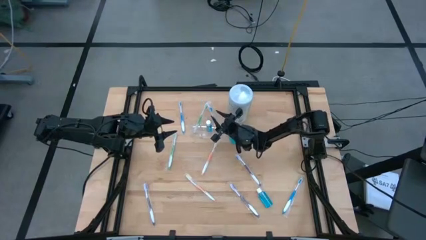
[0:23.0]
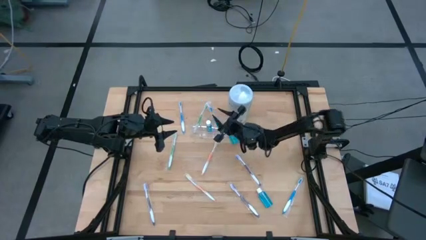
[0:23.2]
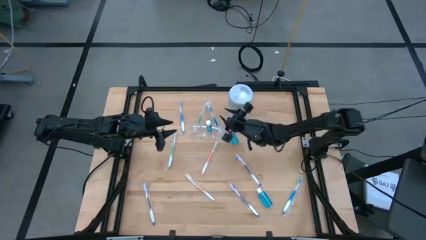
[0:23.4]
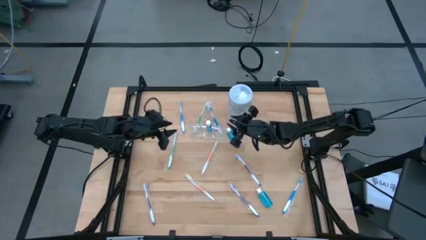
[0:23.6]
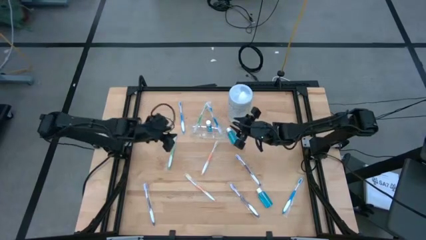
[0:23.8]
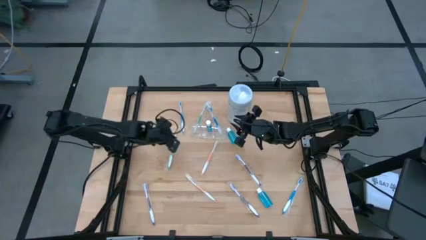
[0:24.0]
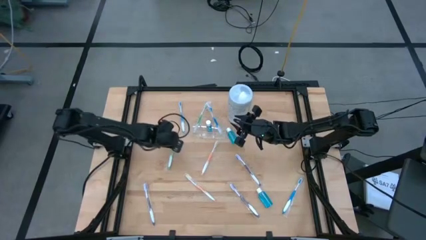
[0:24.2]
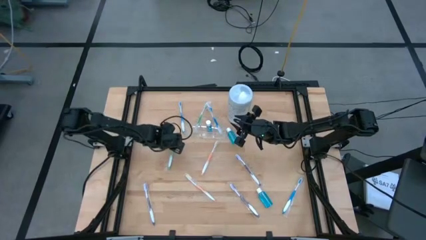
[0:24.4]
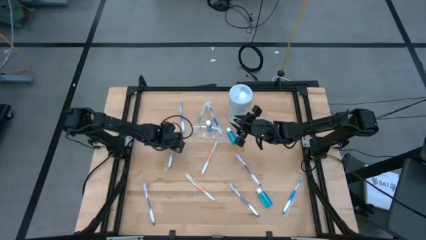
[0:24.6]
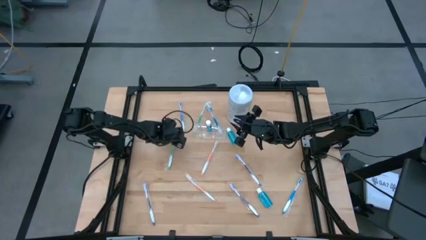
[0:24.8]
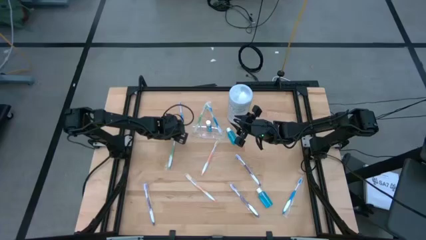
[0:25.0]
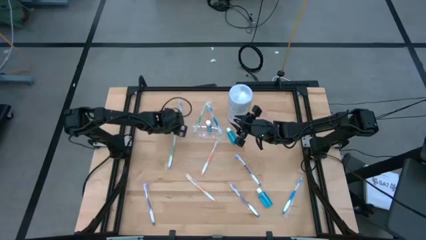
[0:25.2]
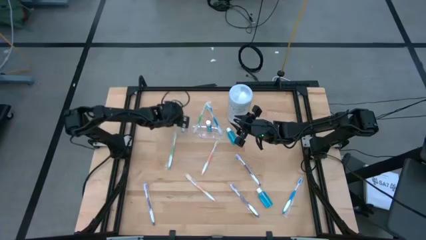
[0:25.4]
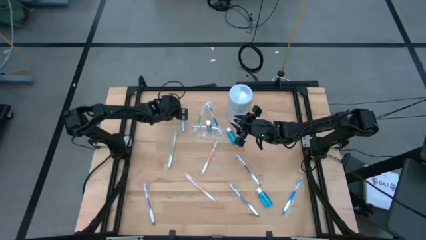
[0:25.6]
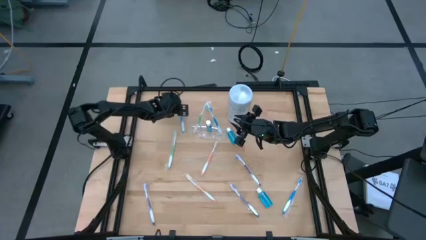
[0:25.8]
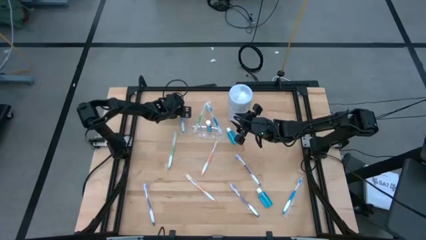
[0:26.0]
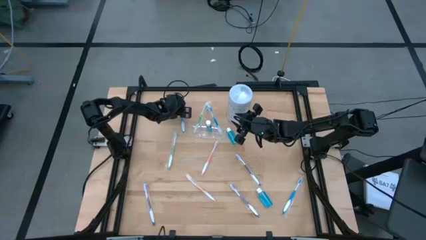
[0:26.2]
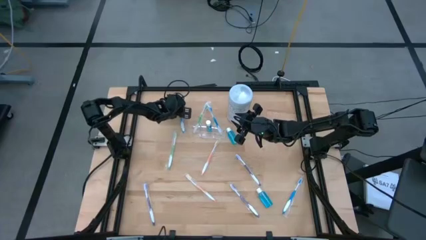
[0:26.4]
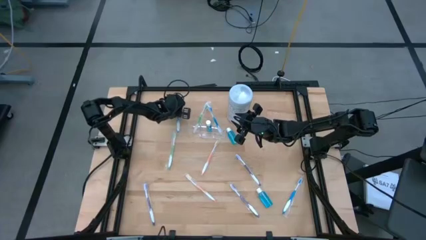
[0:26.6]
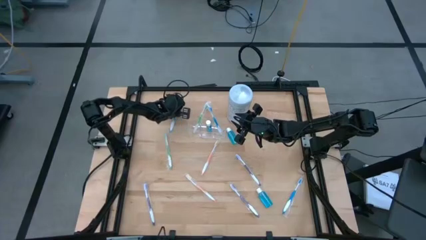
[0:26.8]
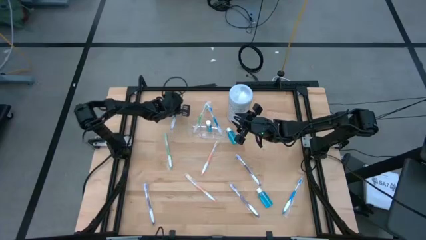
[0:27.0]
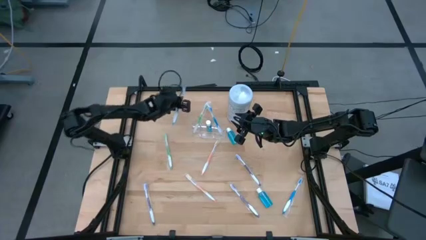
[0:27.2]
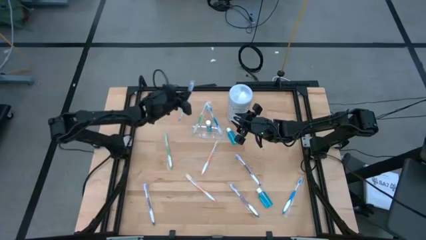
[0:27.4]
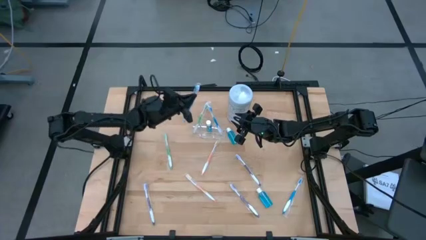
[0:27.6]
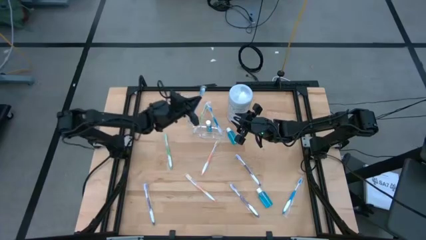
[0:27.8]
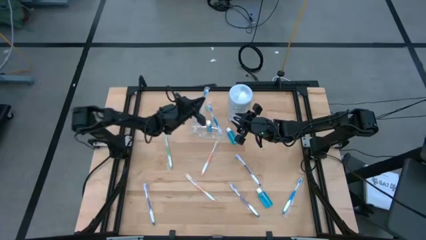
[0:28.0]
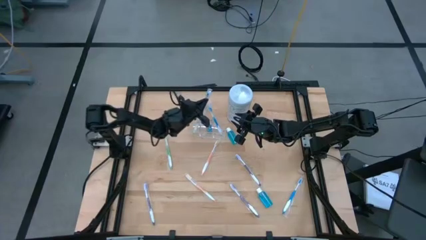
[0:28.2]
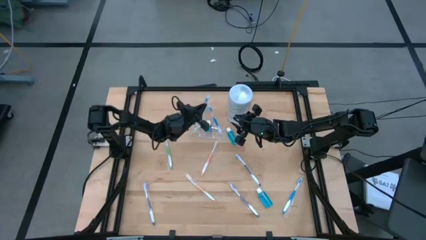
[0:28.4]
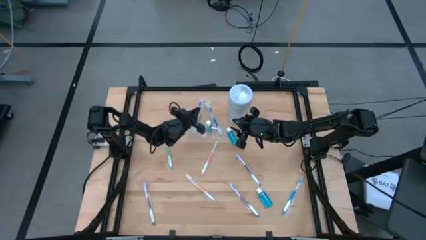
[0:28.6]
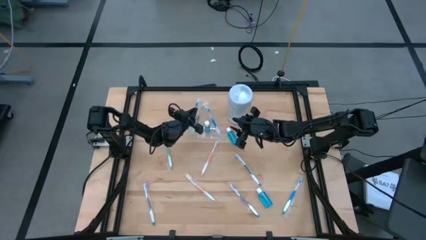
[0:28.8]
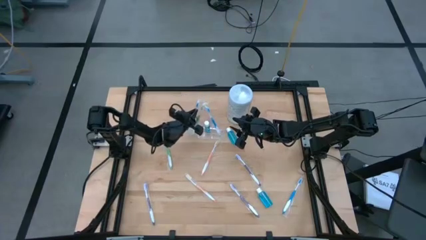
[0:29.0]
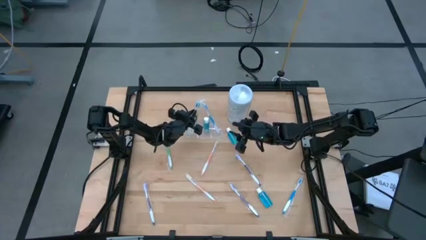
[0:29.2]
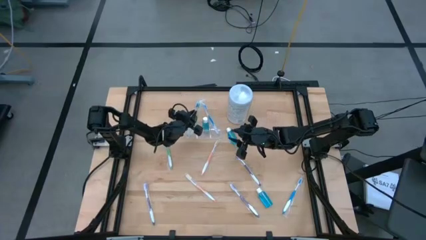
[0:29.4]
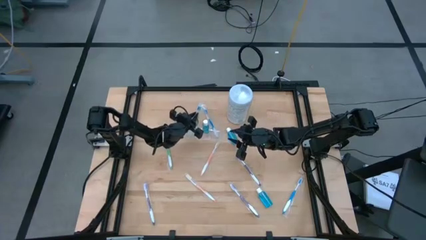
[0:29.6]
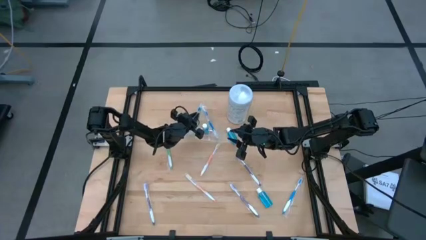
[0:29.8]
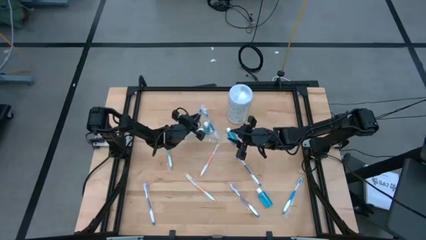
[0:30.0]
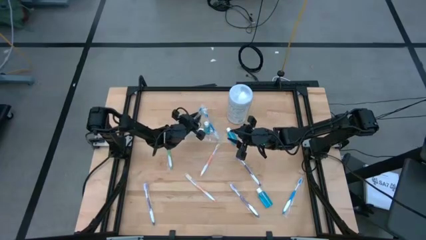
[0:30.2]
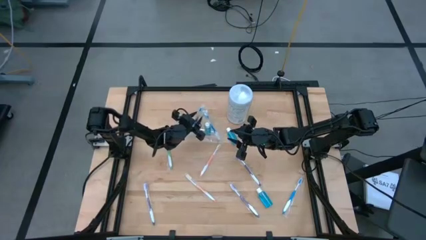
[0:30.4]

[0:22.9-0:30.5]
Task: Pick & Place toothbrushing station
Put the top blue toothbrush into the transparent organizer

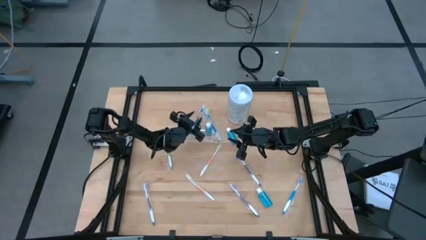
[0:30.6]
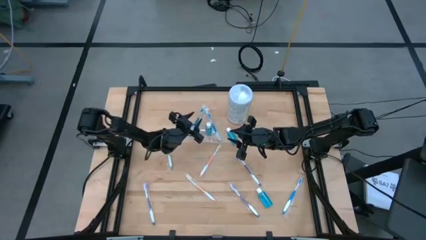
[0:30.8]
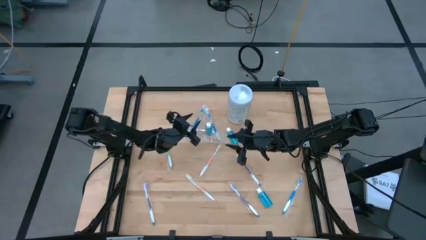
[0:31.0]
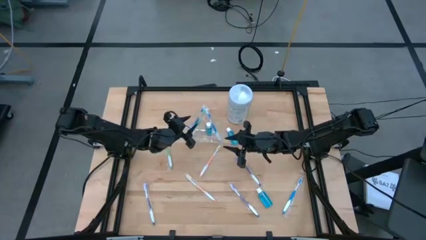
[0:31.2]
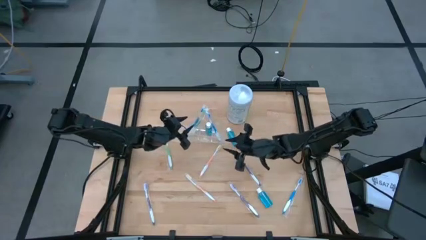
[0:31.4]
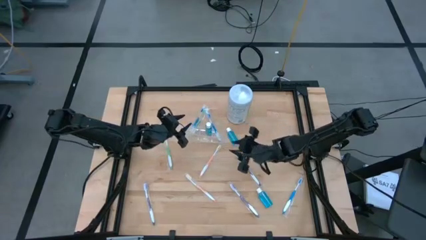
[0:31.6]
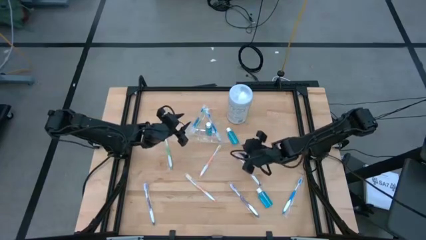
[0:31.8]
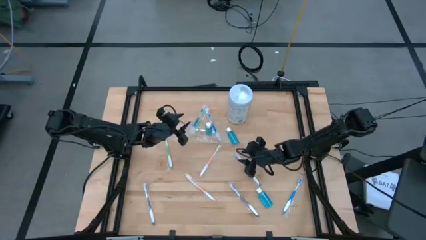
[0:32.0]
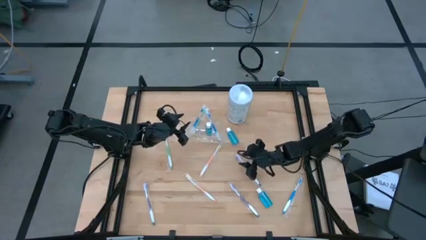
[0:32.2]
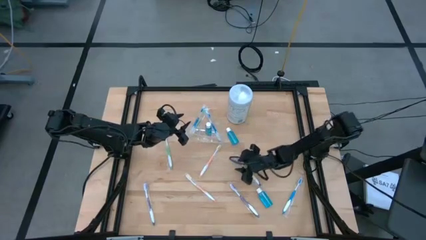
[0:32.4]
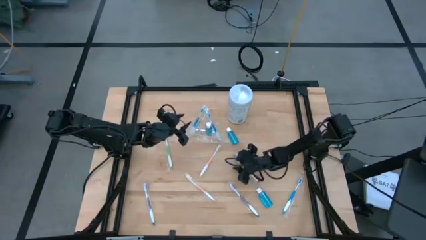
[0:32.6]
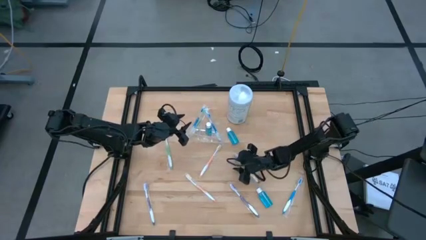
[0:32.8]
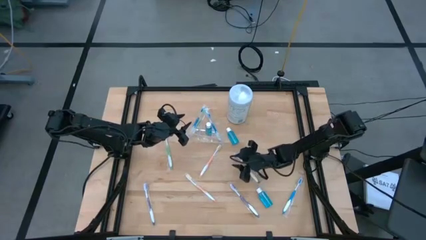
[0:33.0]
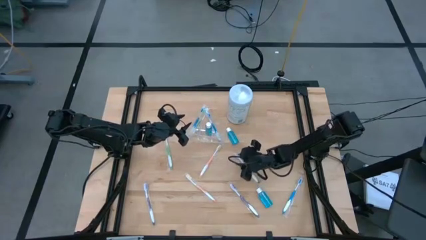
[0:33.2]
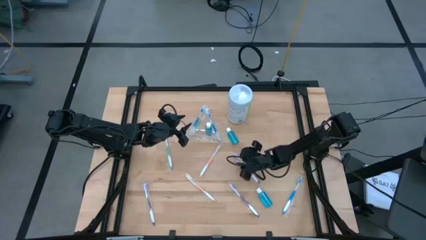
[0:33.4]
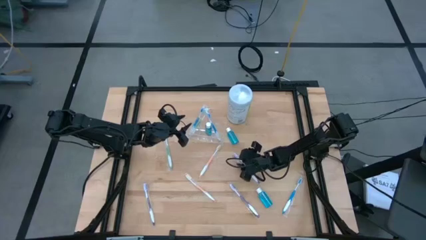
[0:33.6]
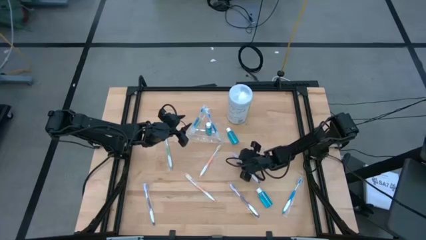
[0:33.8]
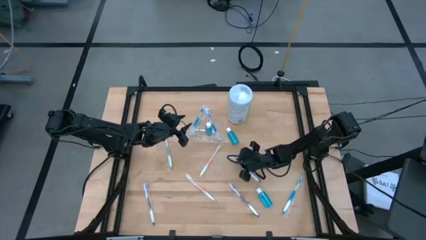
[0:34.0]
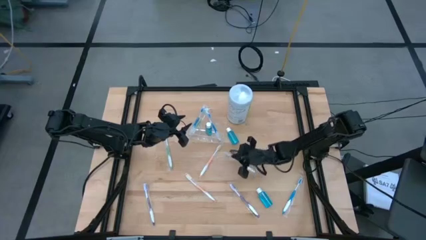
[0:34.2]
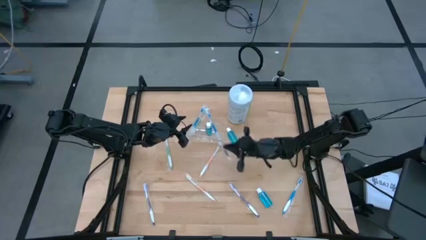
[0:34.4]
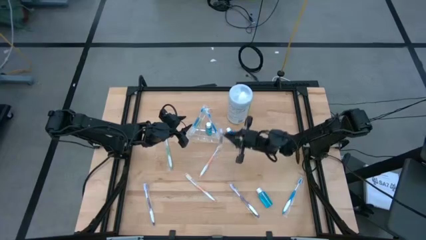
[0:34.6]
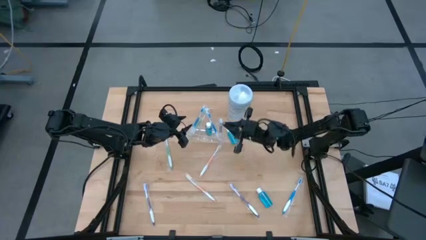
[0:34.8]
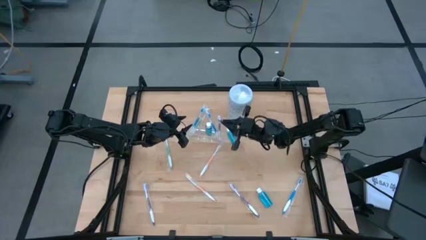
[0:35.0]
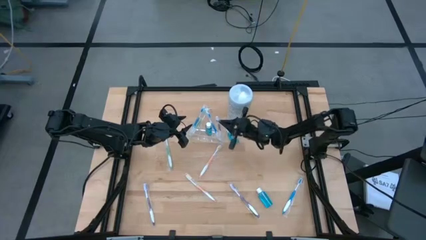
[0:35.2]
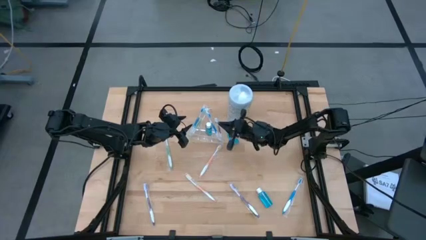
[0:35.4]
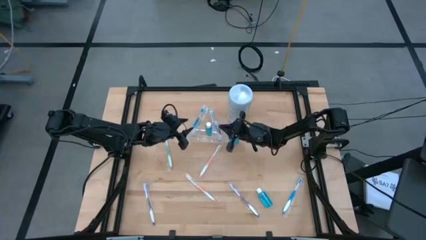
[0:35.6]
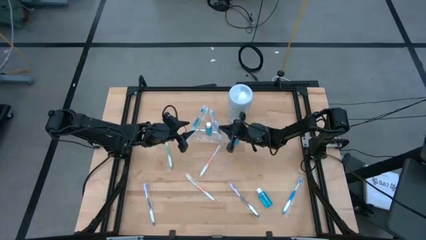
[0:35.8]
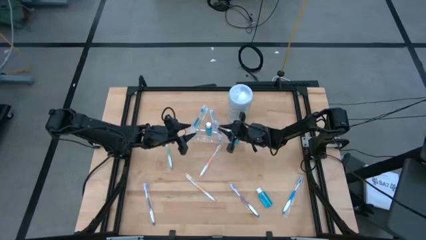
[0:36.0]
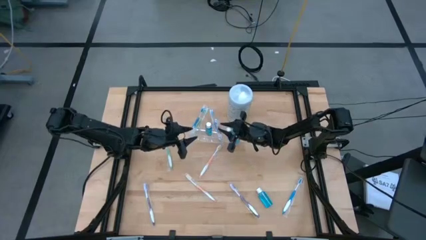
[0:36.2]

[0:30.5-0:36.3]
Put the top violet toothbrush into the transparent organizer

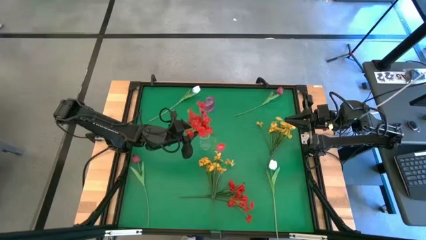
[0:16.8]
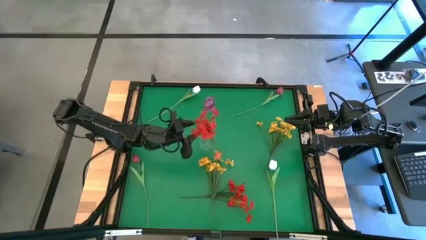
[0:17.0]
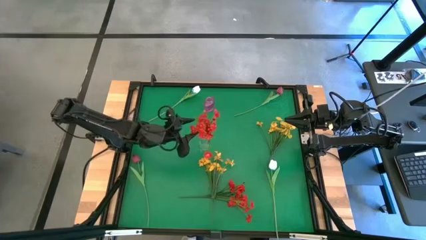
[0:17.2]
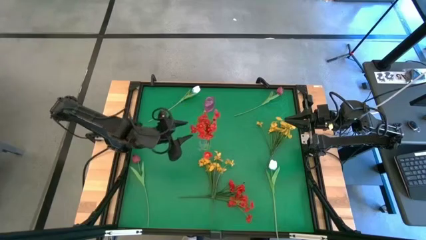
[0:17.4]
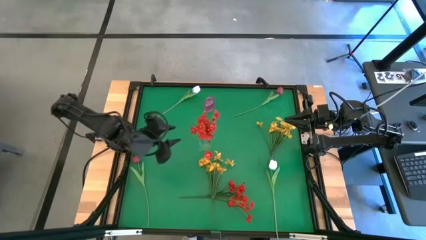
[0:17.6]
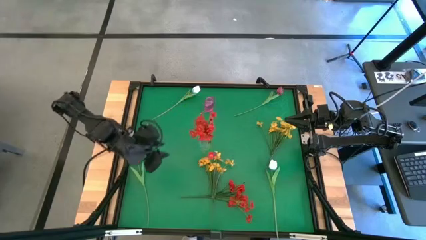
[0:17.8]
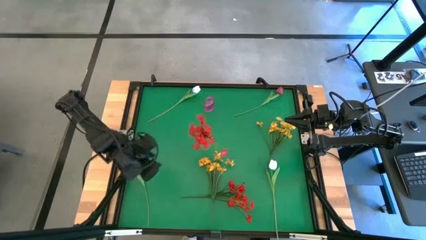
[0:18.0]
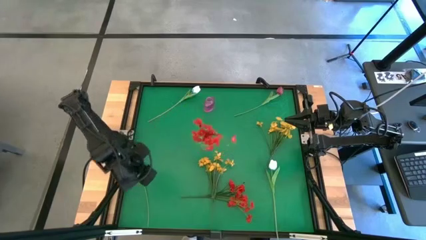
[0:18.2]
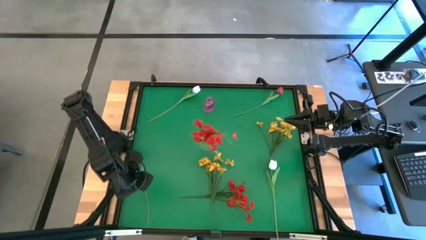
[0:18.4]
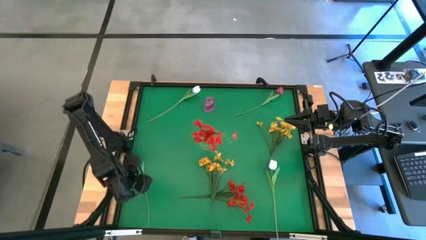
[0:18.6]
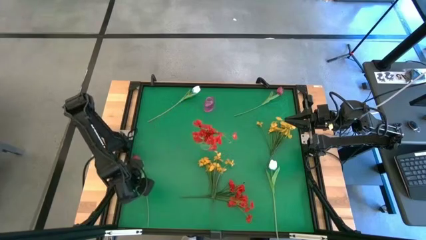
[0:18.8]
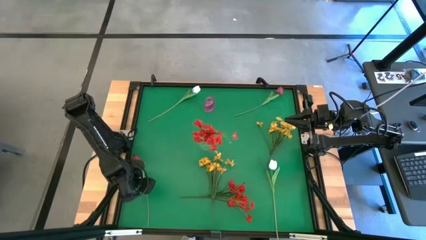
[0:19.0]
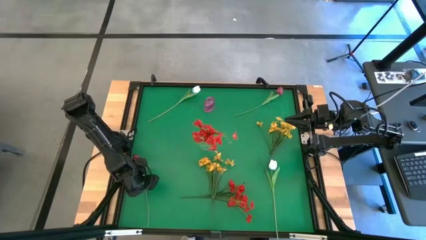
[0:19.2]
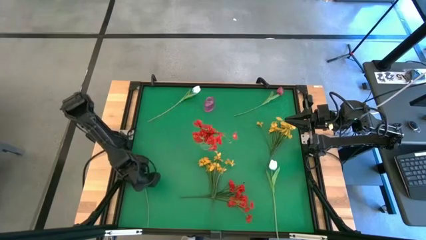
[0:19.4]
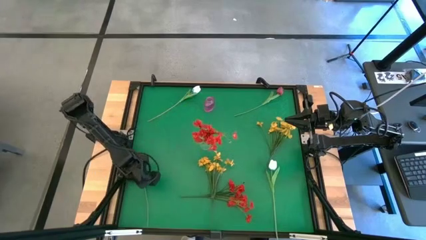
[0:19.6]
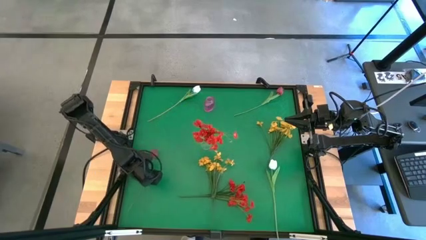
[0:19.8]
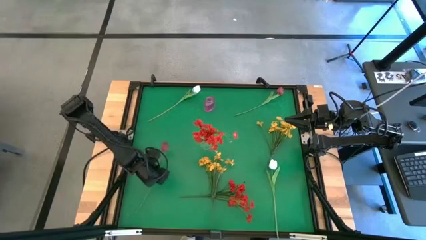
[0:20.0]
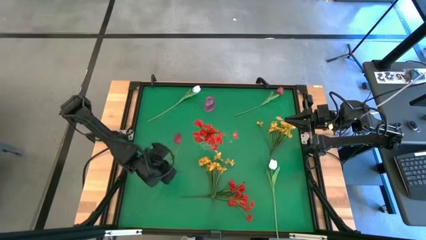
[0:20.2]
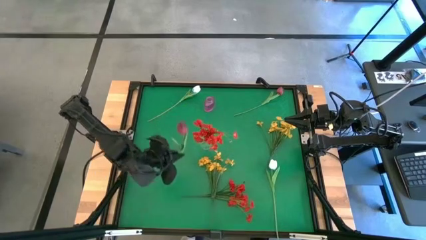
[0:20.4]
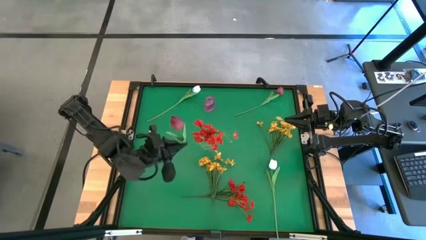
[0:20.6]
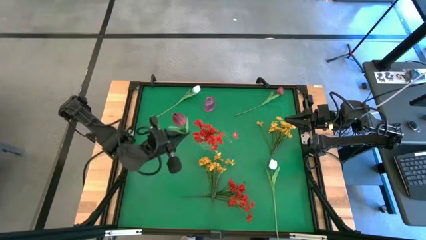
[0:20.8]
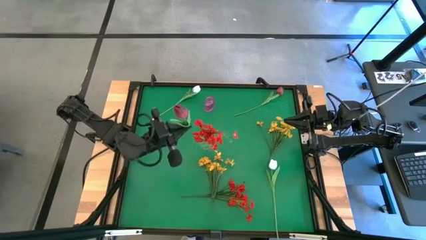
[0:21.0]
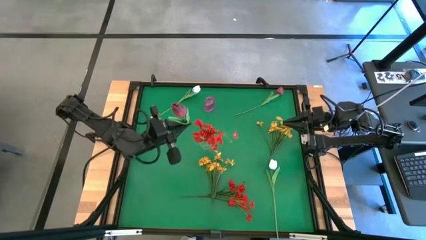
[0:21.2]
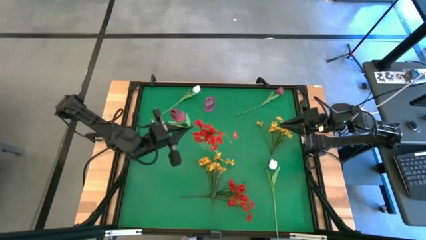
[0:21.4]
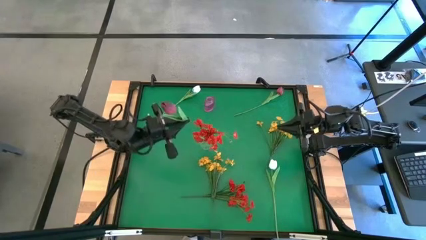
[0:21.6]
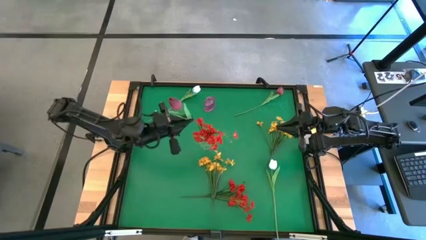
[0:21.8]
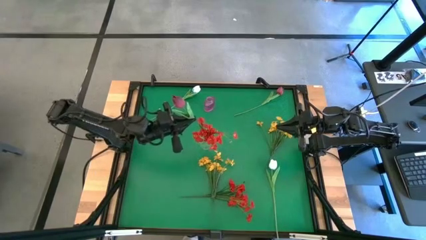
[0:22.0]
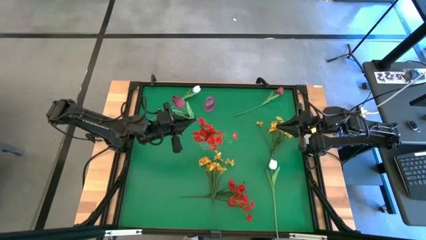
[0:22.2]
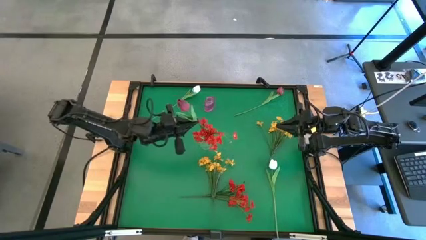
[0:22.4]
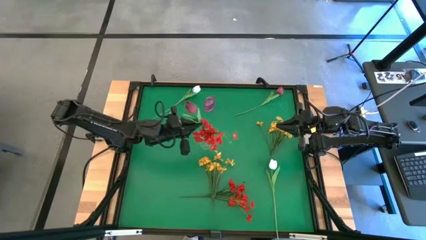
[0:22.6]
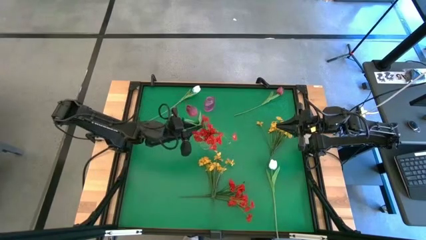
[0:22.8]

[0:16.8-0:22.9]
Task: Sort flowers into vase by color
Put the bottom reddish pink flower into the transparent vase
